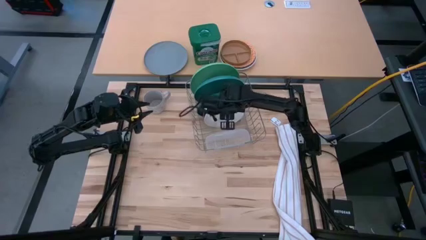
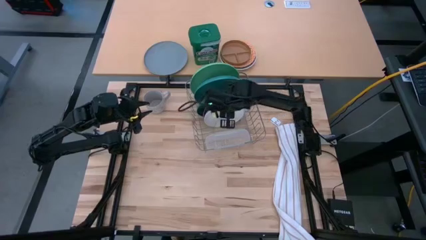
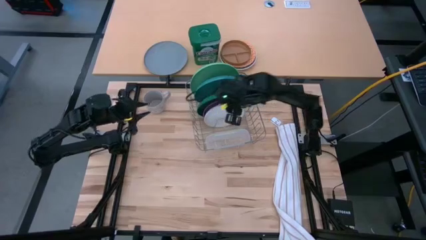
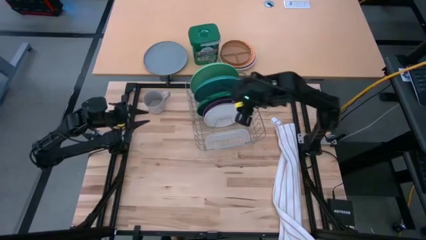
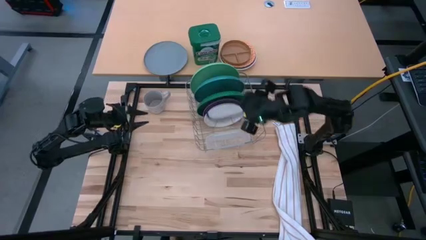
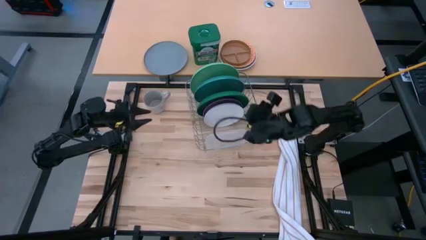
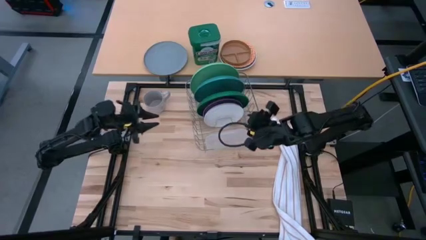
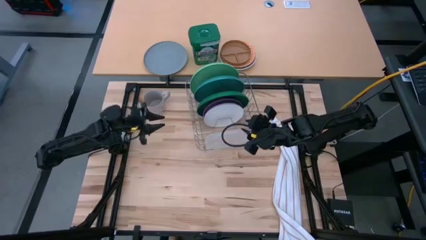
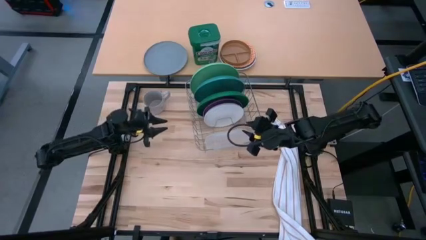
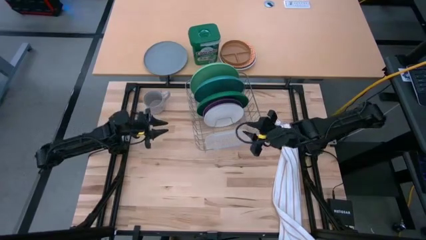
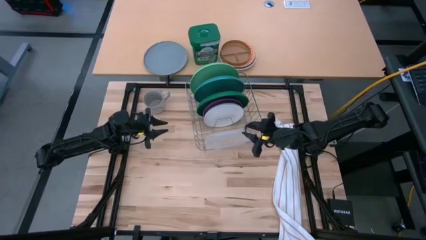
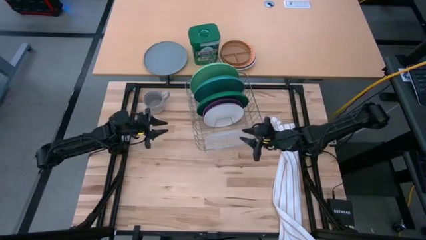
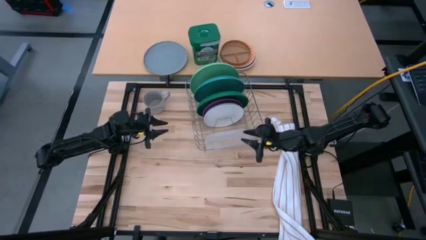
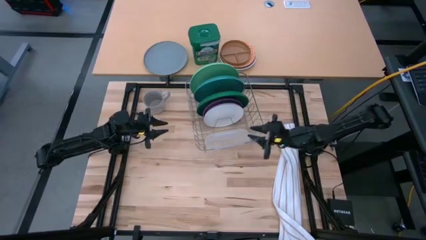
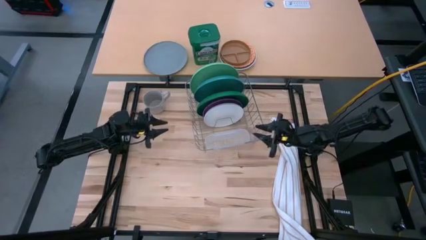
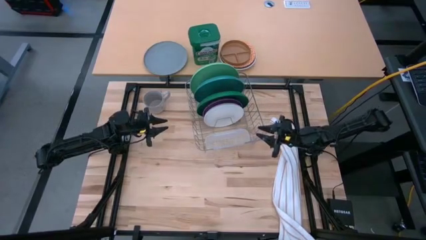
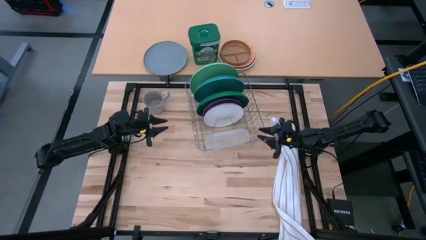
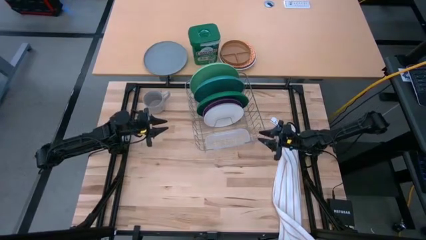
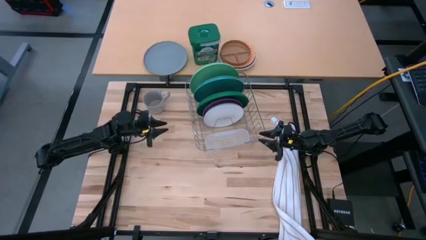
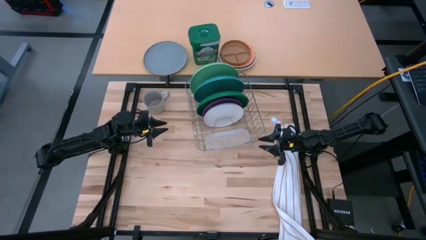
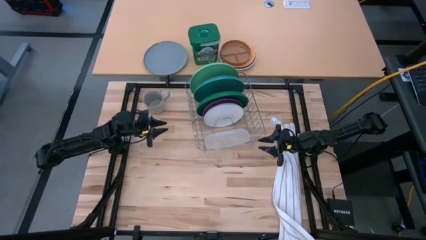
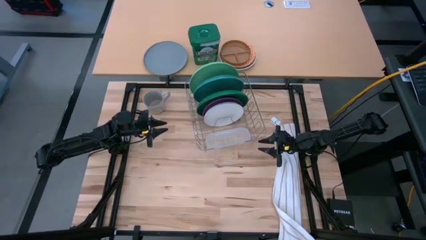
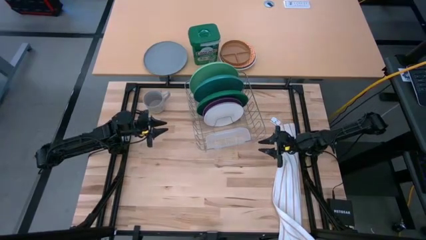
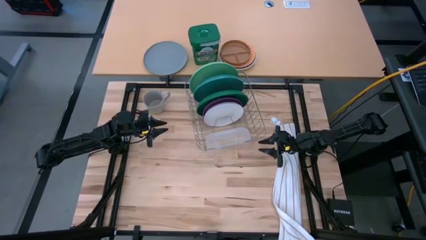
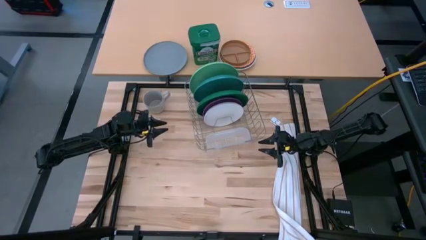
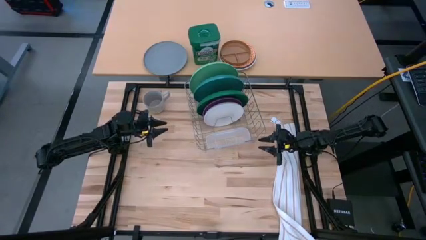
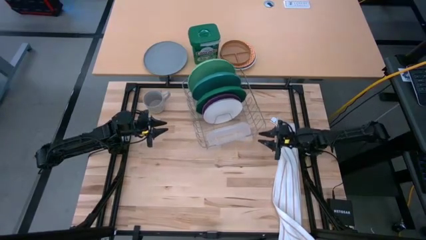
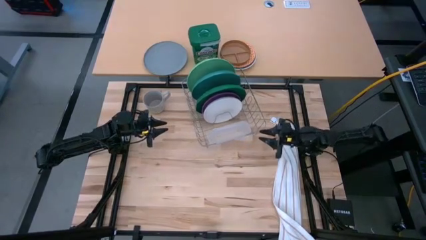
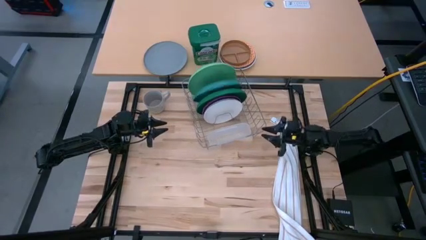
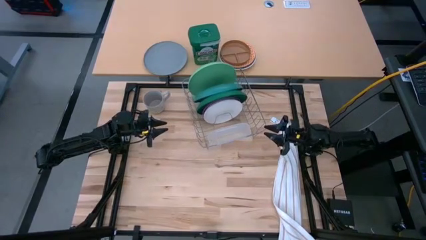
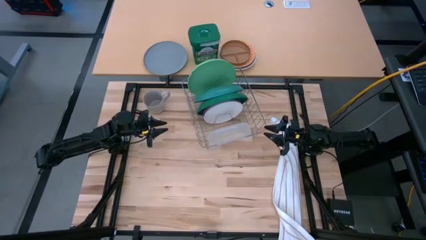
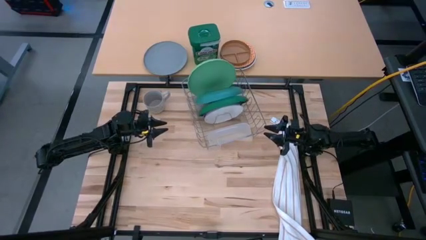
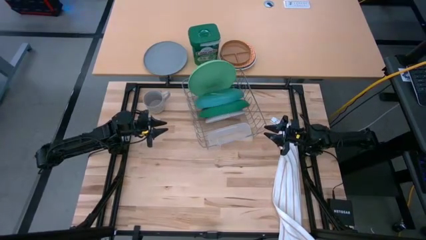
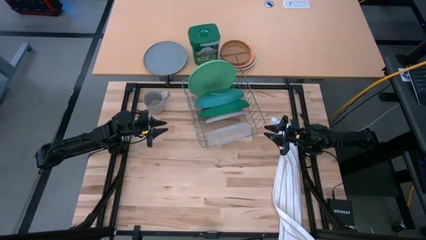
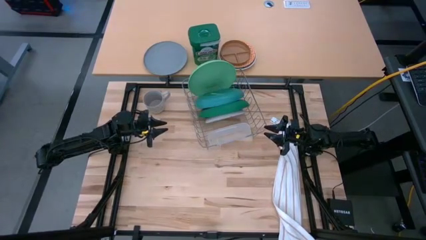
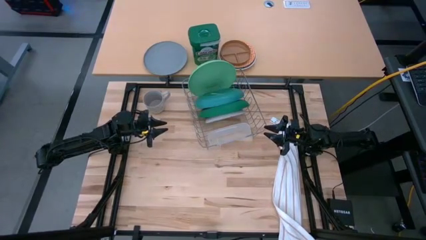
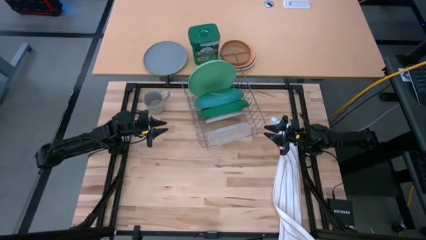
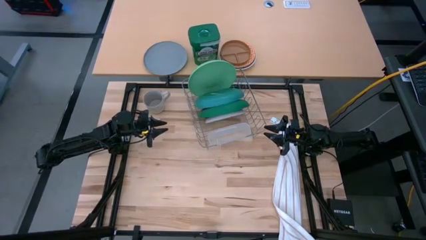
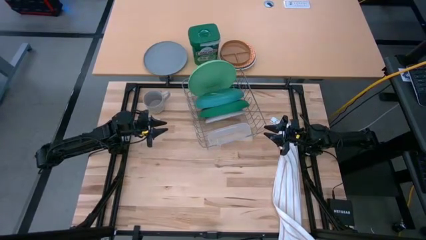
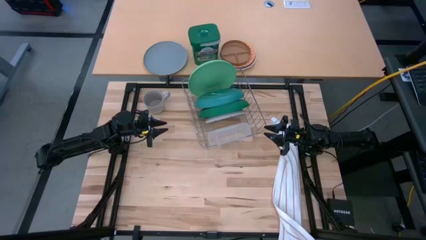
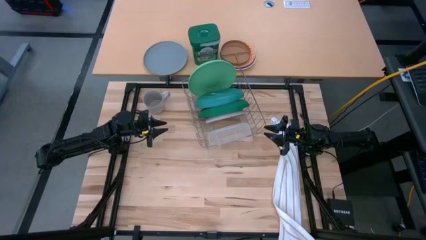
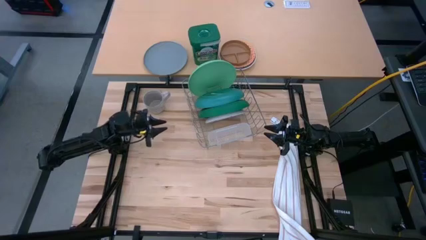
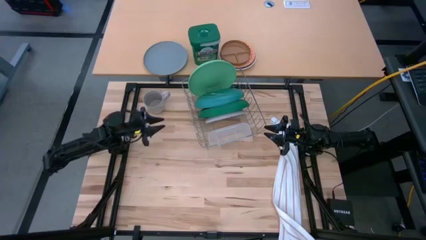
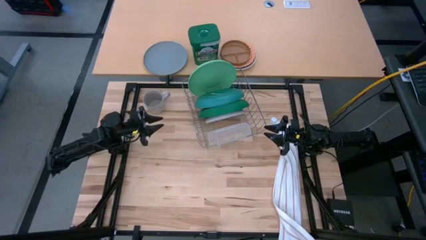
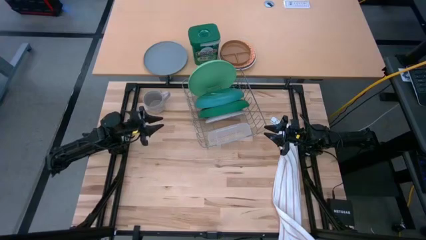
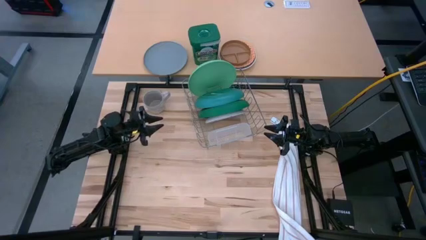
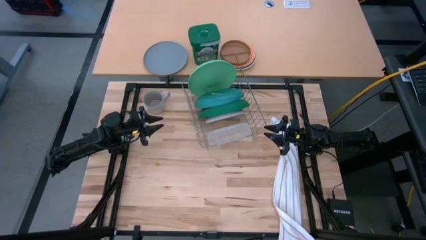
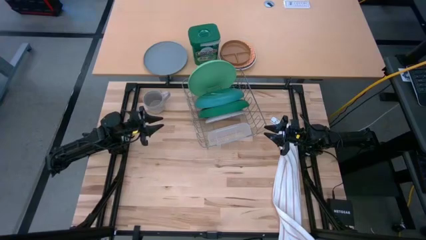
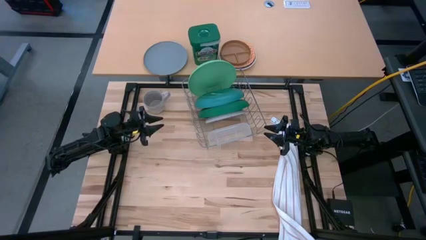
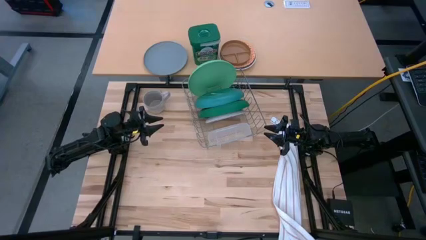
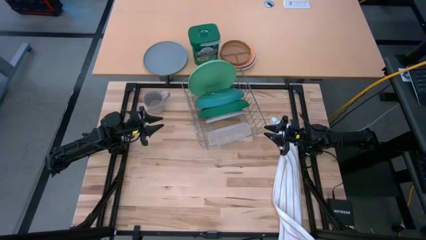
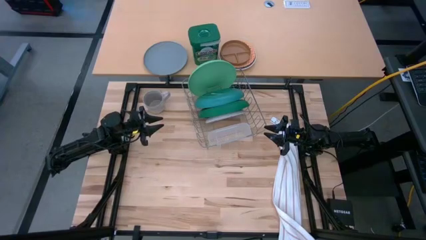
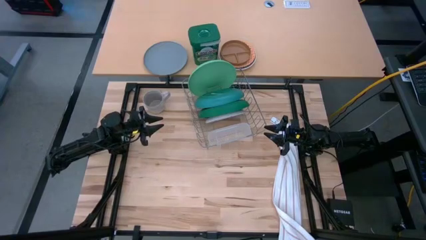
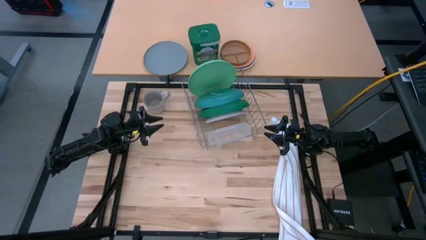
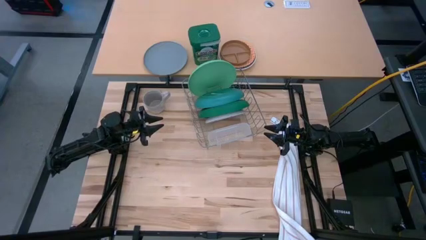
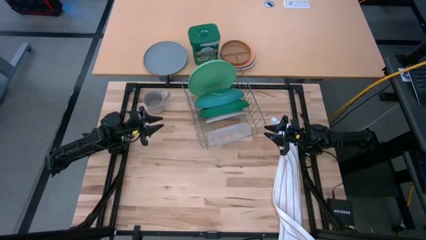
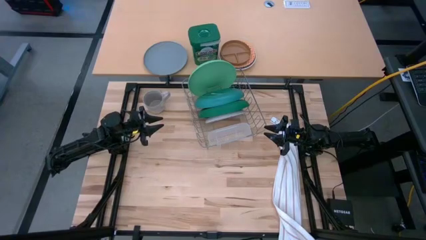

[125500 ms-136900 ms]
Task: Sort dishes
Return to Home Position

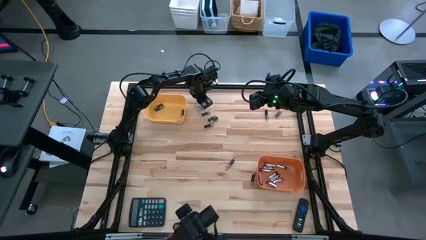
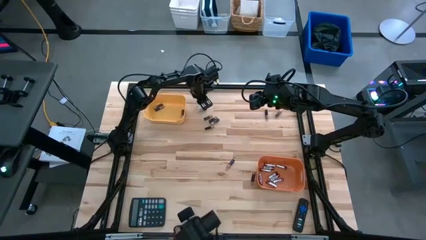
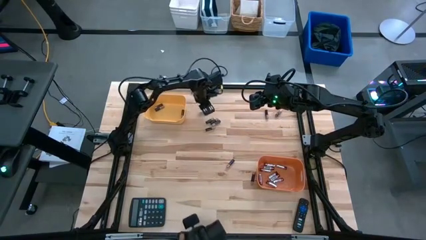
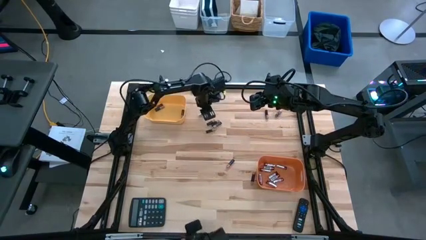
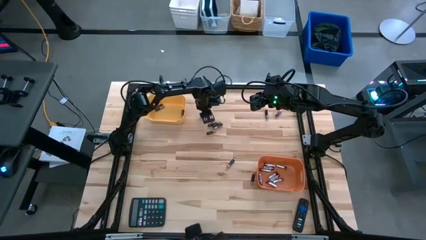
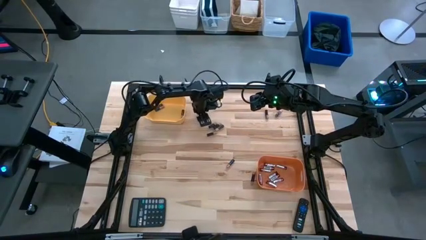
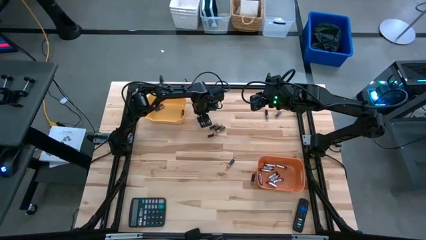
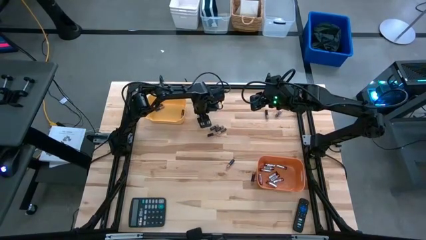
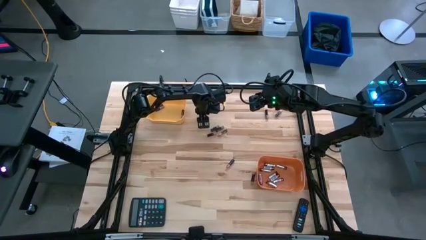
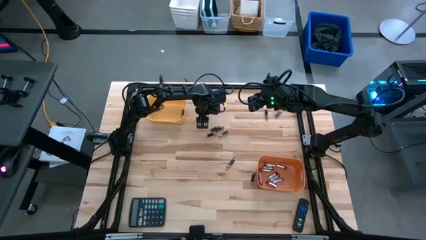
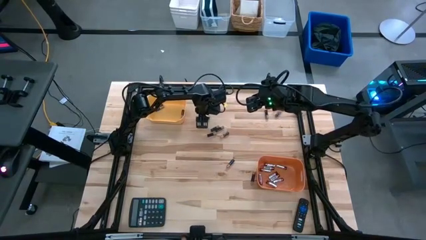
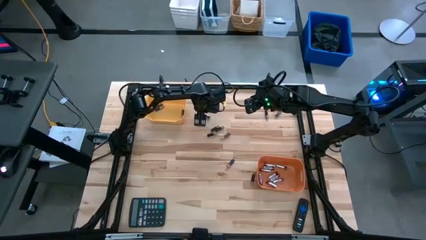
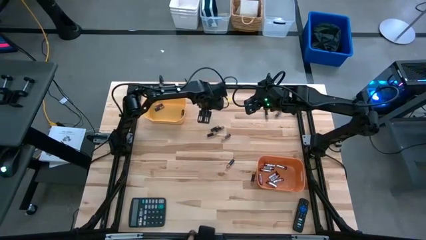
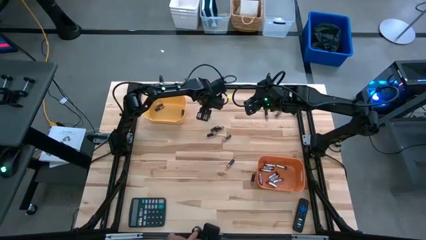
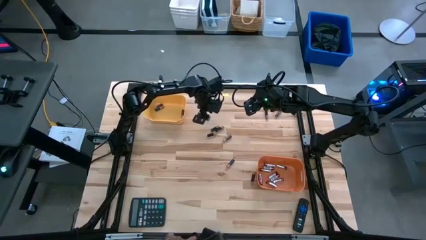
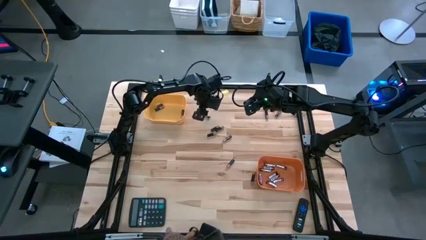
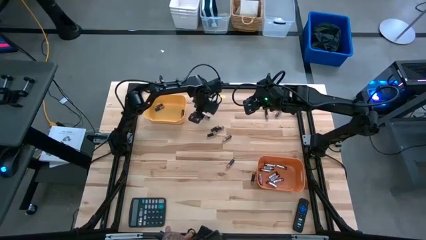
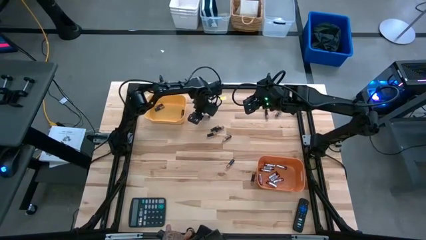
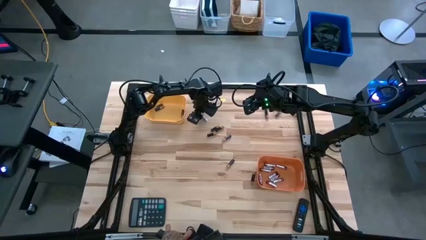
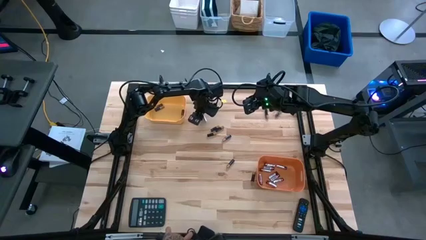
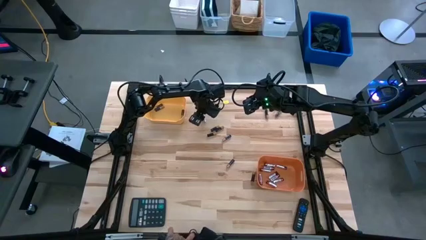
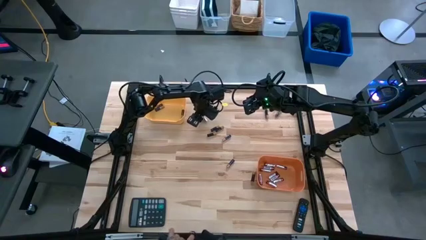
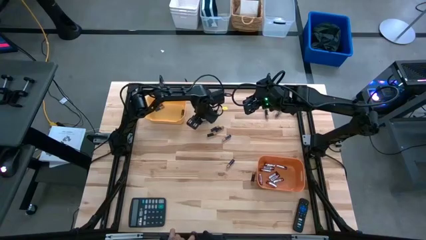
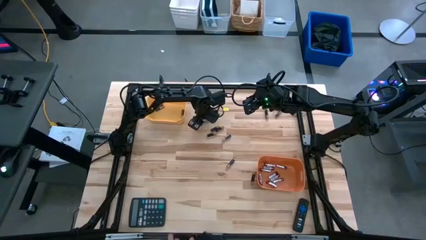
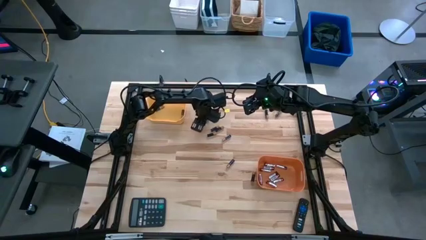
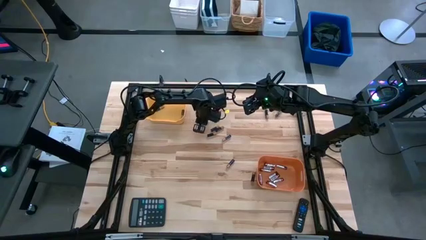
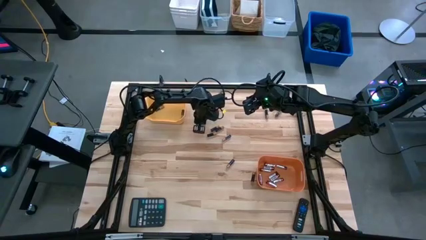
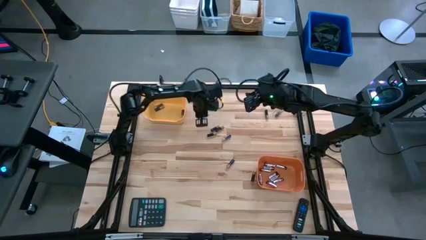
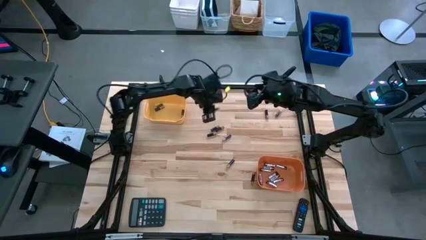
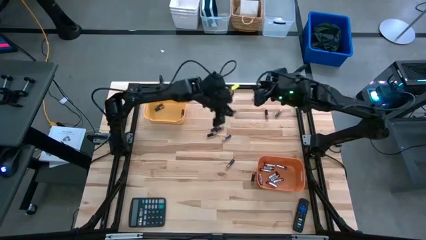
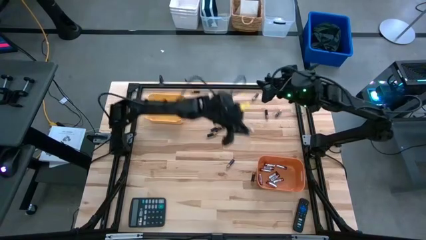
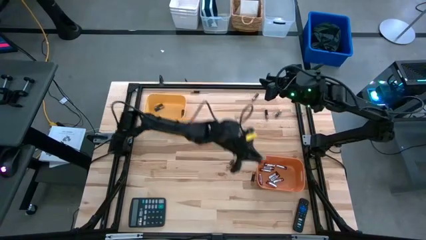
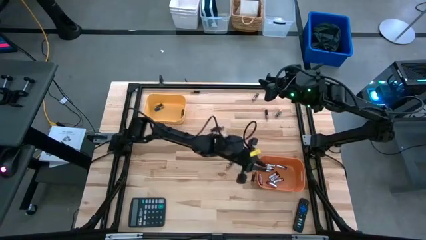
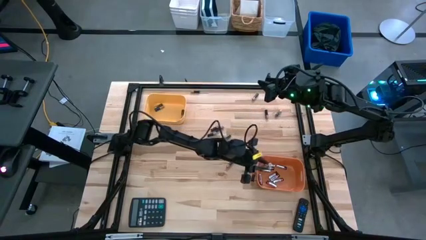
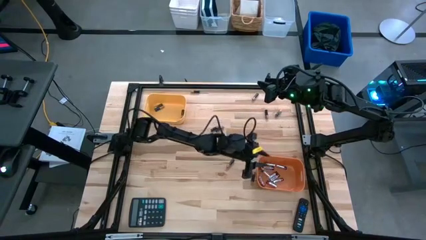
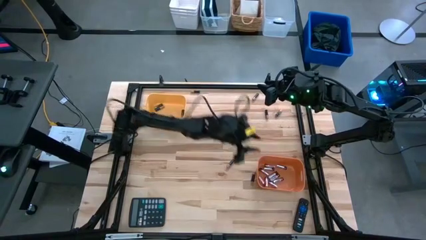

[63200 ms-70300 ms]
Task: Sort batteries
Put the silver battery into the orange bin
